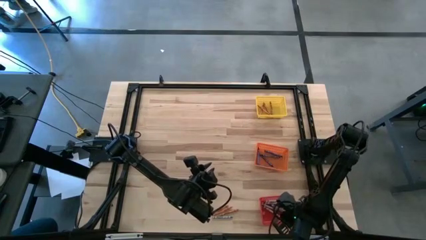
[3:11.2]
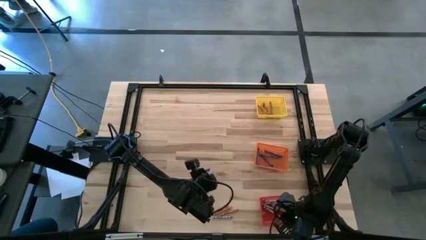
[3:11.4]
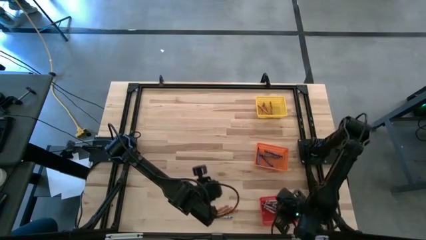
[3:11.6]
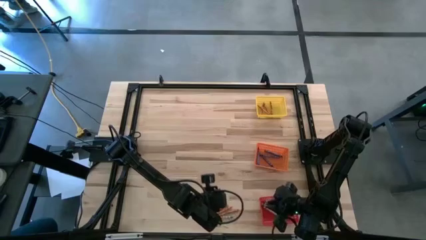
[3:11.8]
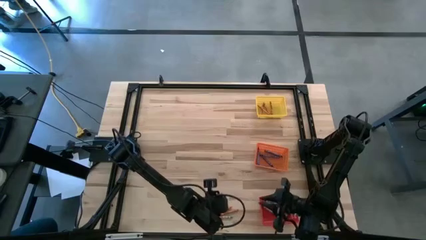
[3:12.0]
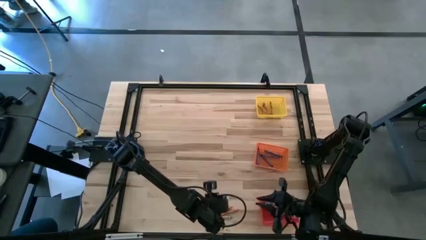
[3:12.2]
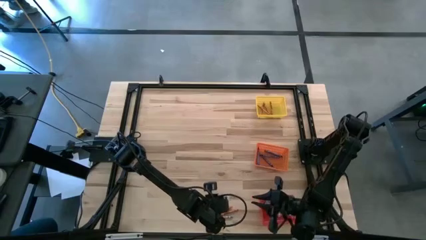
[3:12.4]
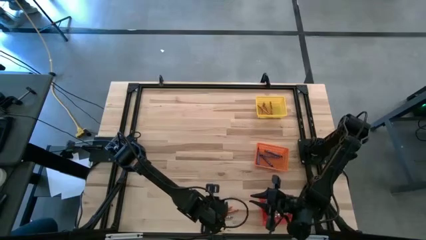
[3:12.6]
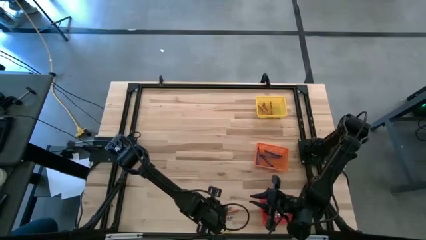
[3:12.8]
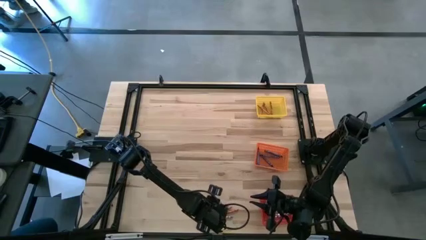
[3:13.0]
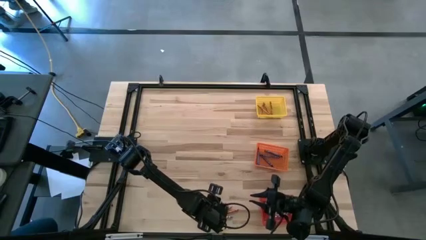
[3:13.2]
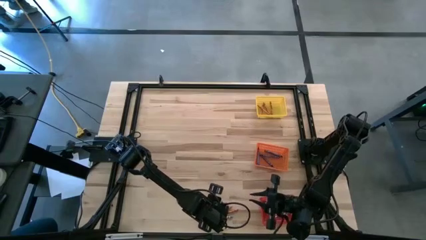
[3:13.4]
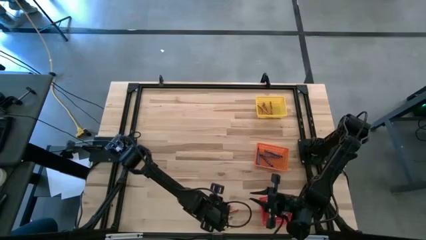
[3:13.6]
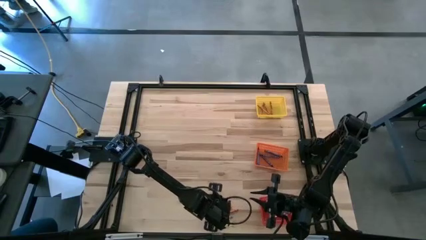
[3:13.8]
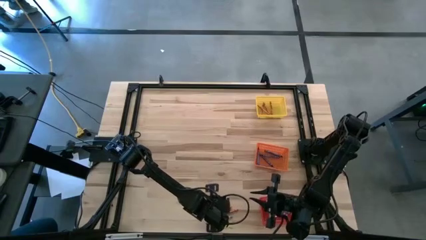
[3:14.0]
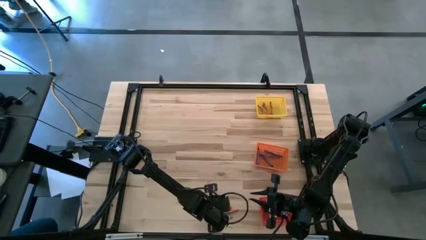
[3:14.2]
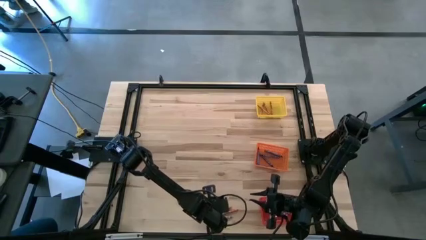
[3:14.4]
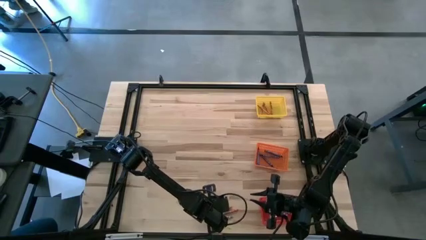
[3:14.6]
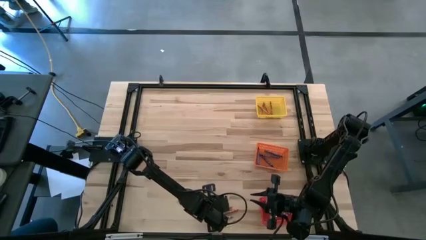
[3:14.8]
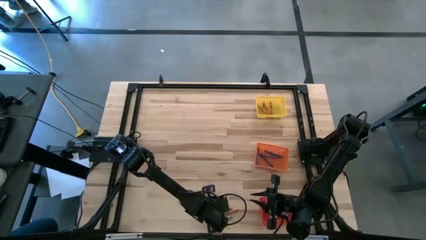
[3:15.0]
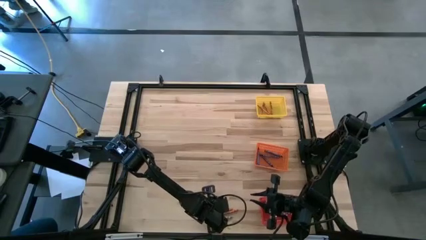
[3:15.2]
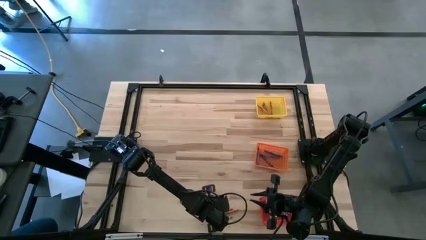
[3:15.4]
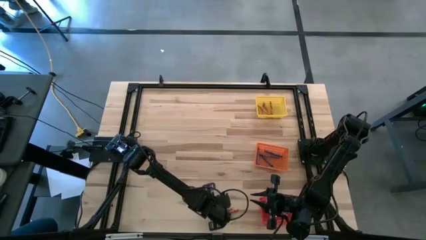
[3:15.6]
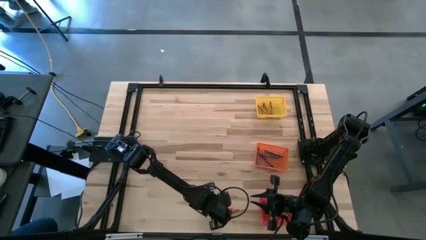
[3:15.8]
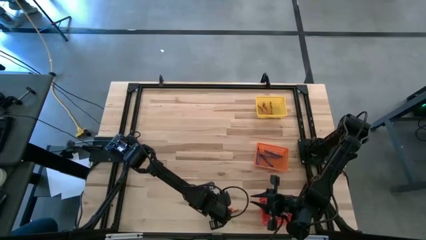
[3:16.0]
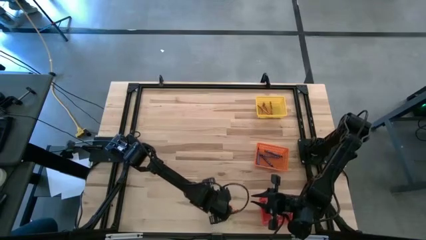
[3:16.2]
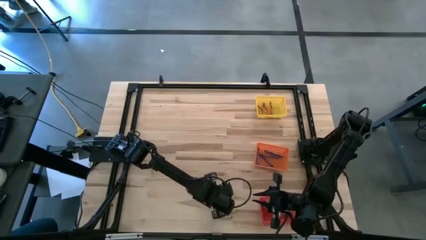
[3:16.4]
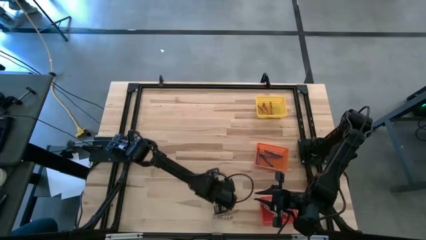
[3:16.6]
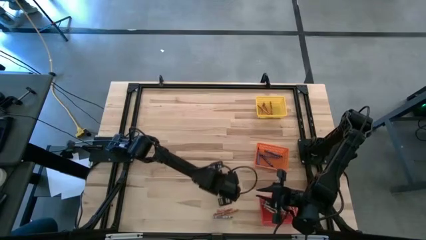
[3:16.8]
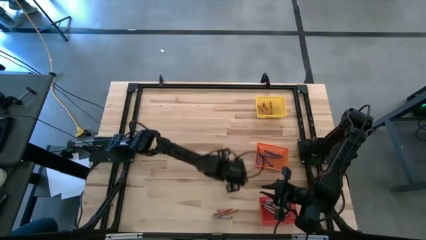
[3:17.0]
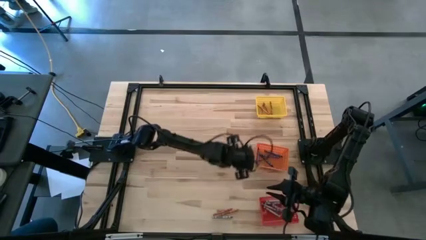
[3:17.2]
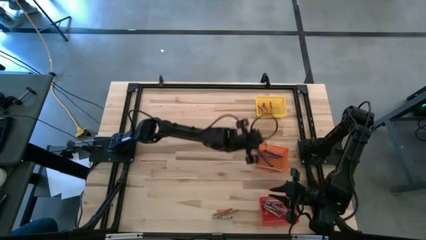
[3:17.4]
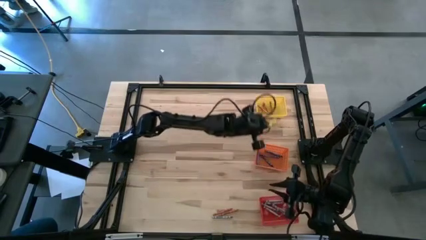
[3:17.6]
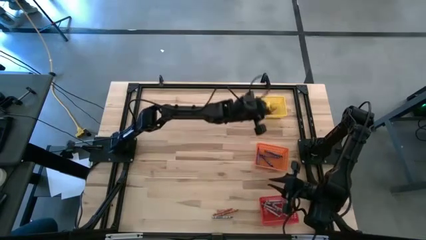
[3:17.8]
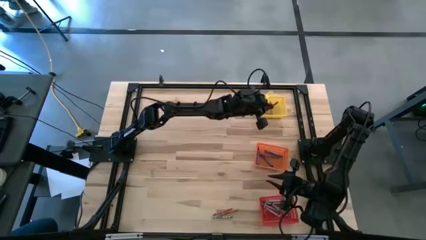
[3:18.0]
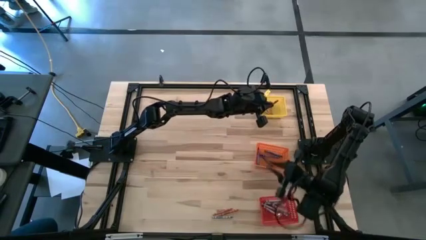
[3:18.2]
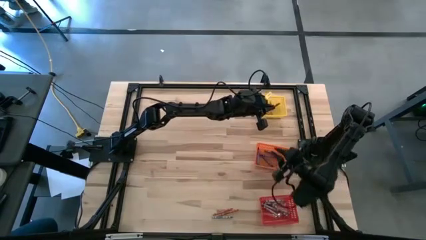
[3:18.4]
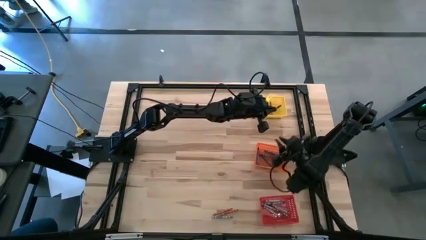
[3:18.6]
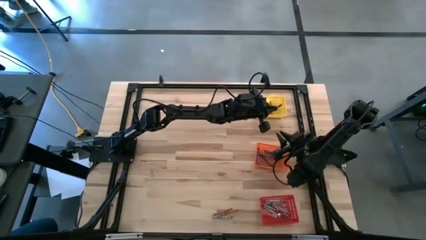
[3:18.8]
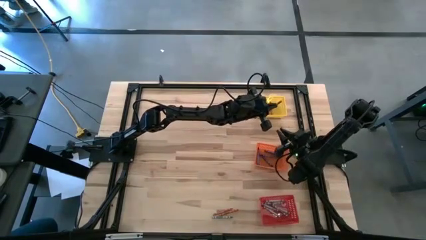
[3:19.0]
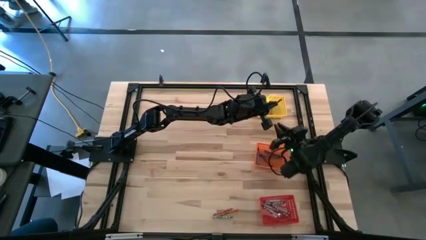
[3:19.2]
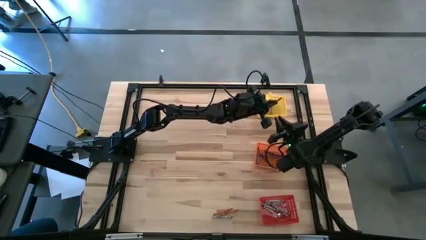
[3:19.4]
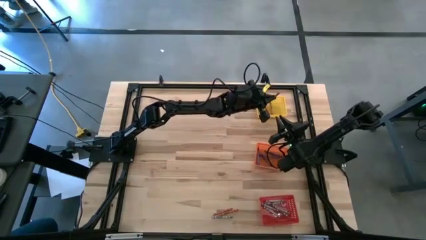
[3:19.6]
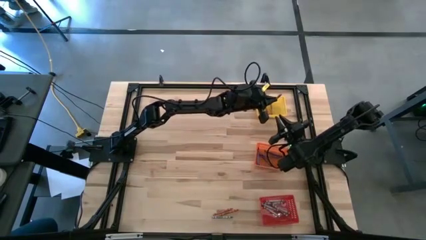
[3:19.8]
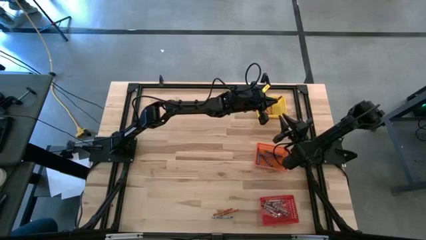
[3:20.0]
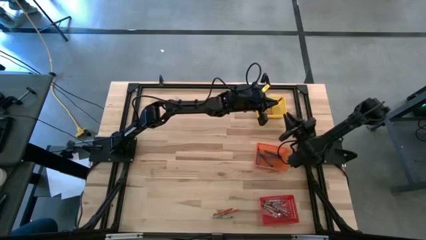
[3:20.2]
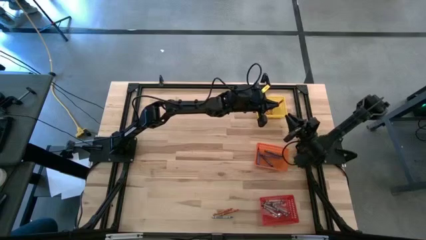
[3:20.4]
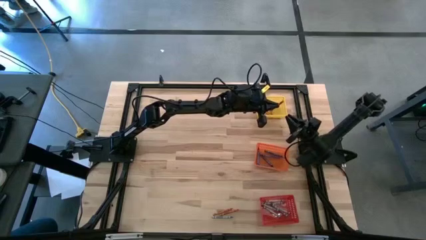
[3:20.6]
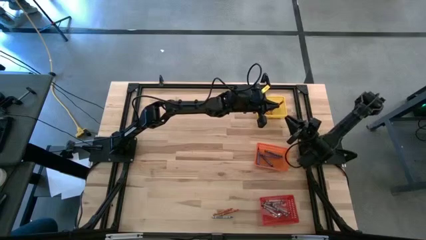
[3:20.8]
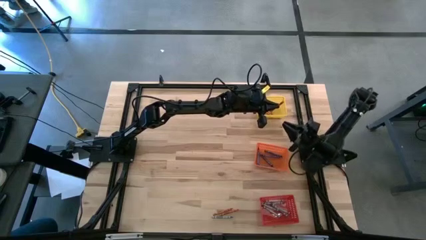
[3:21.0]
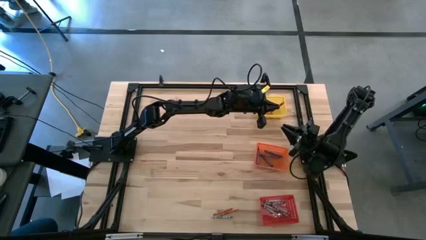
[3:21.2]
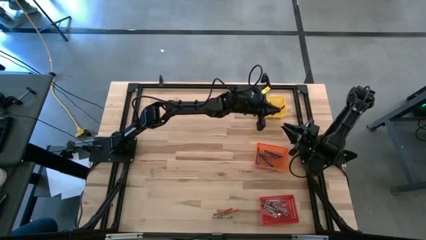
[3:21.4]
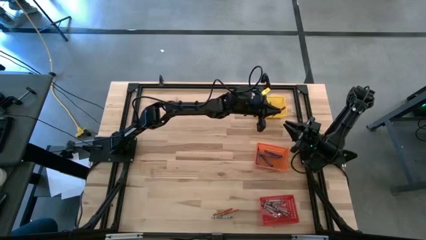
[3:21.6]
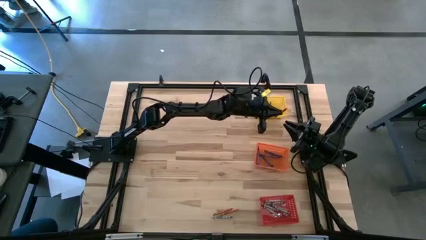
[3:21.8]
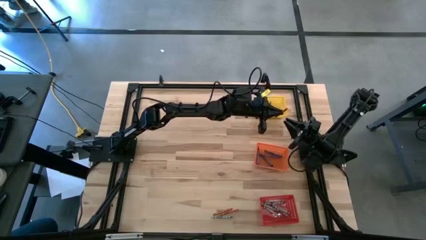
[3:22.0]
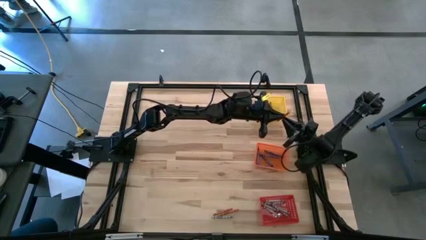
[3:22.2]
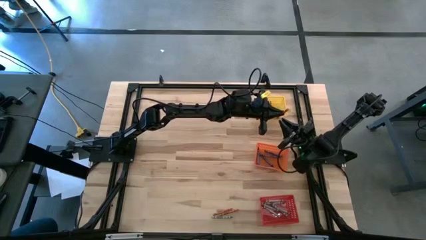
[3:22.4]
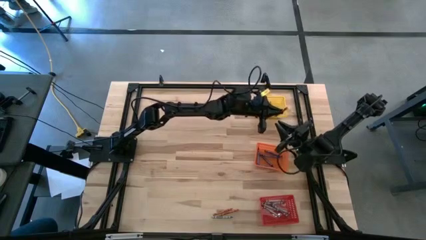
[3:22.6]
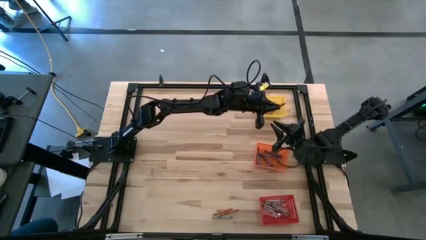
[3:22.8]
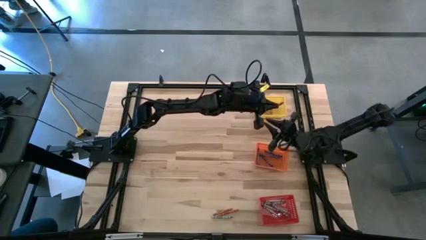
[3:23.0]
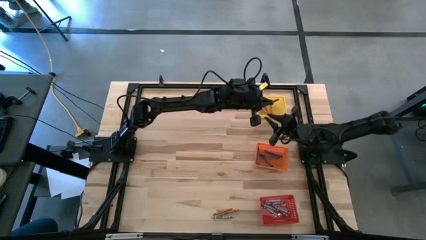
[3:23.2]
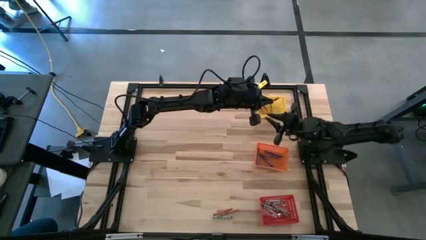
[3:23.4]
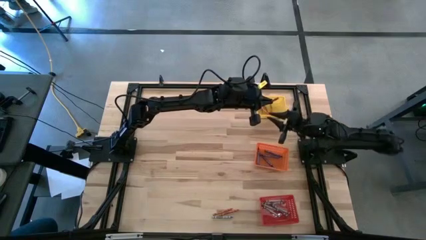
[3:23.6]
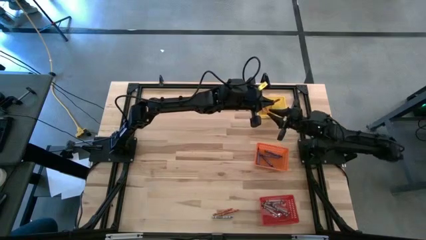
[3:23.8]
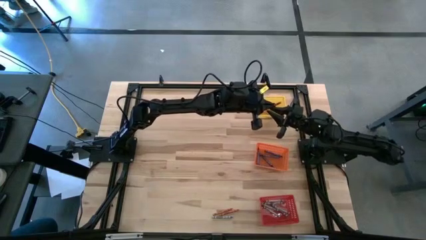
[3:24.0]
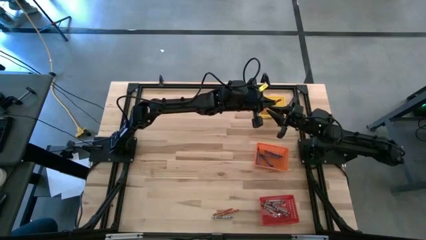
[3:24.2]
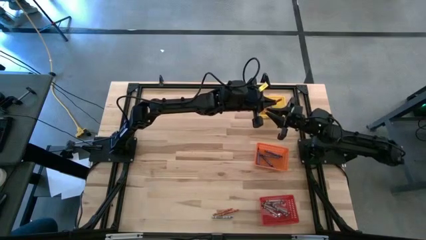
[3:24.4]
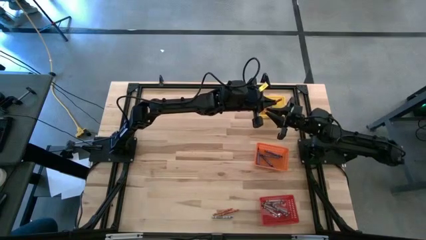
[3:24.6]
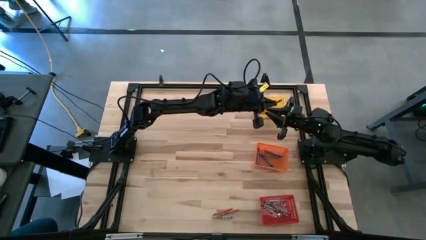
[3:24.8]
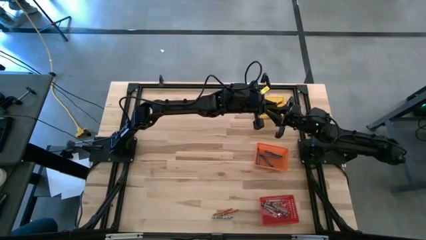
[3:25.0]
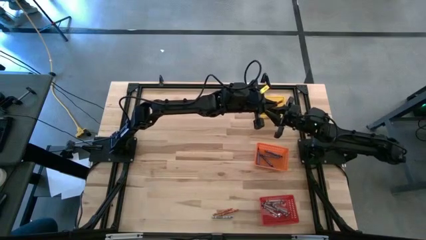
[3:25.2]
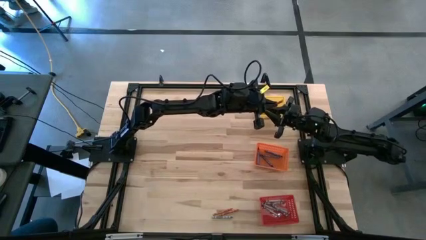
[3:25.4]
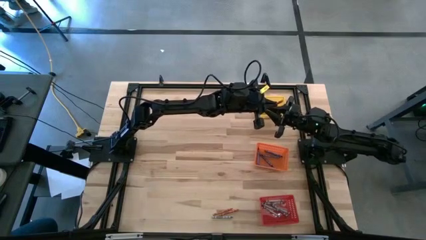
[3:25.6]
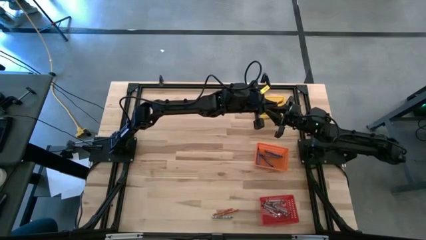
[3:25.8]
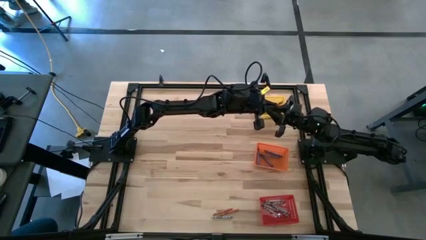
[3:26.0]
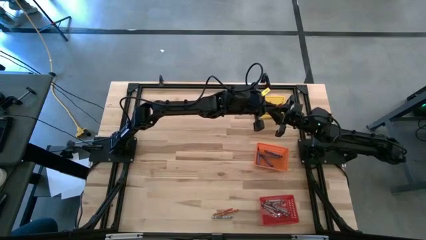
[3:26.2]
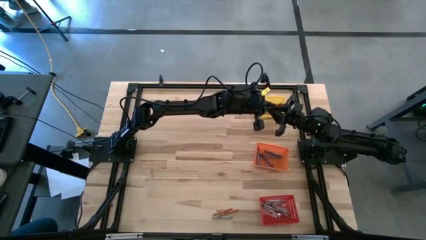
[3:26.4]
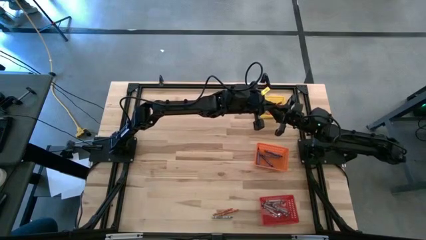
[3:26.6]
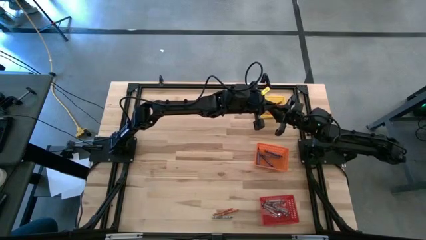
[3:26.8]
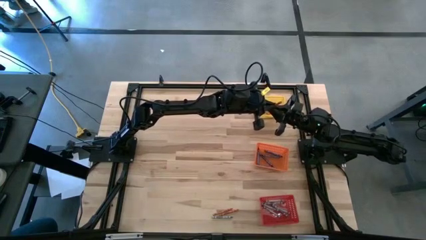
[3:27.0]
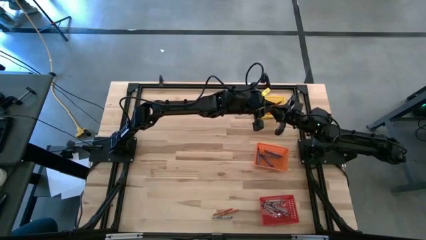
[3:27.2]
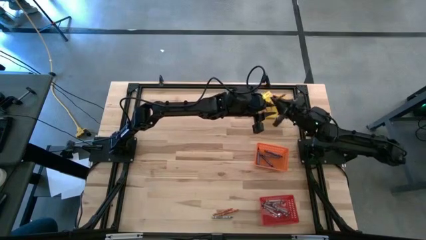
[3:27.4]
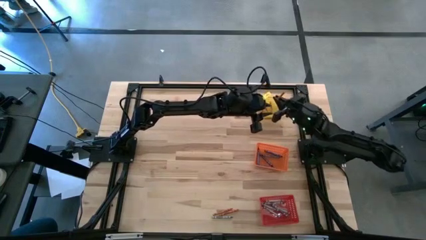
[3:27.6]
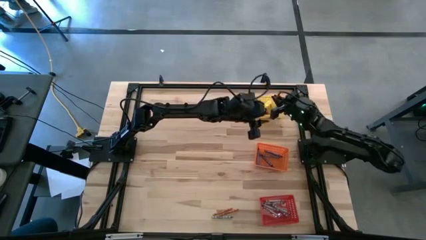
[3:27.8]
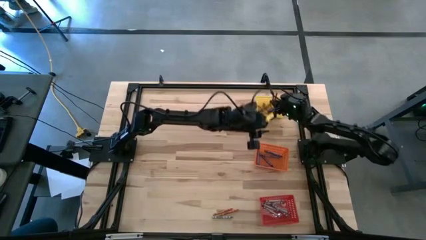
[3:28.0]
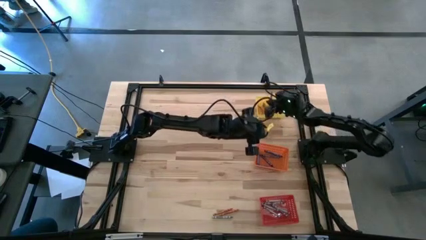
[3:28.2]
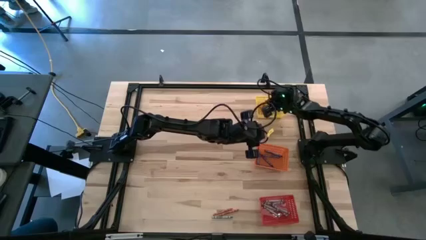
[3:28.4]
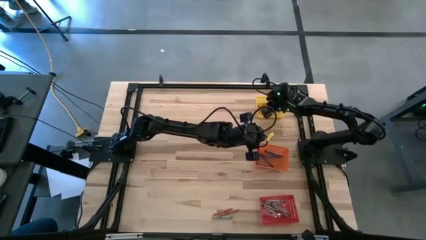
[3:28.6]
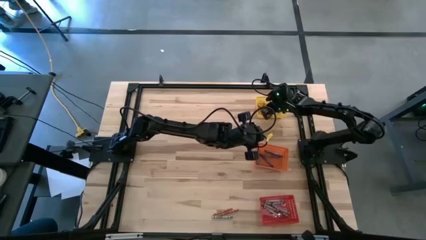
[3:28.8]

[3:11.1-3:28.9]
Task: Sort crayons
Put the orange crayon into the yellow bin
